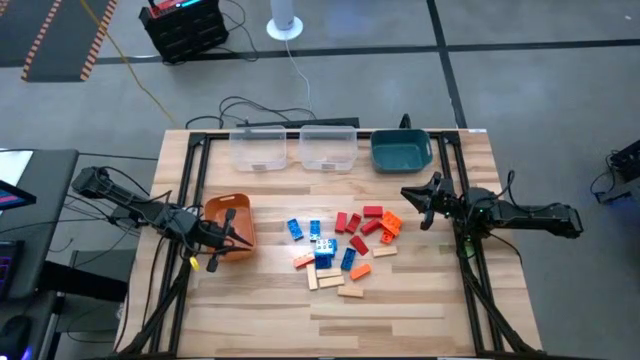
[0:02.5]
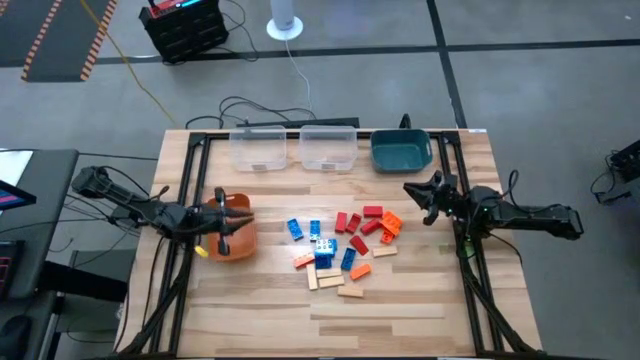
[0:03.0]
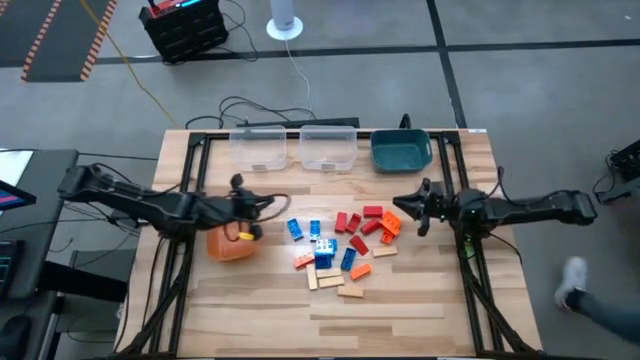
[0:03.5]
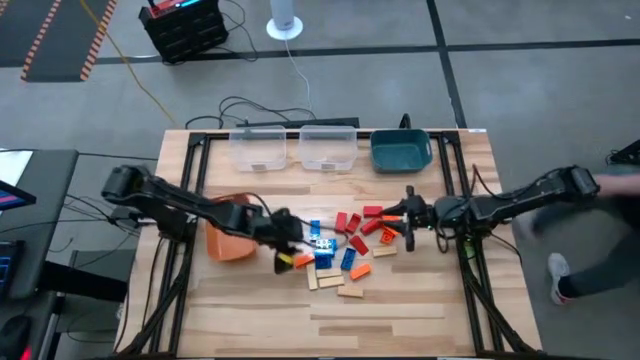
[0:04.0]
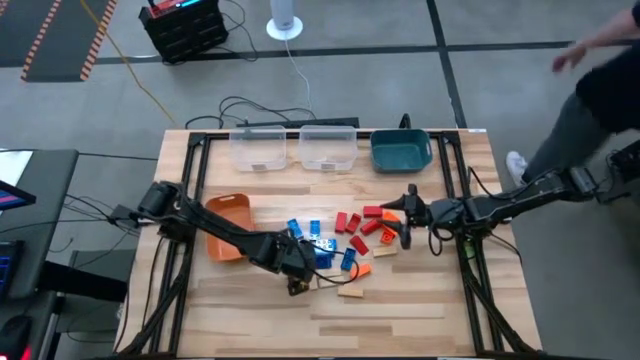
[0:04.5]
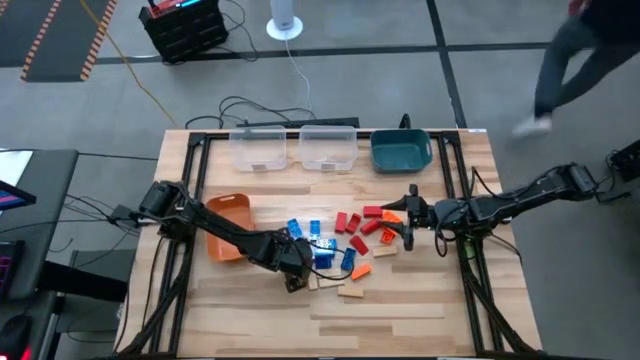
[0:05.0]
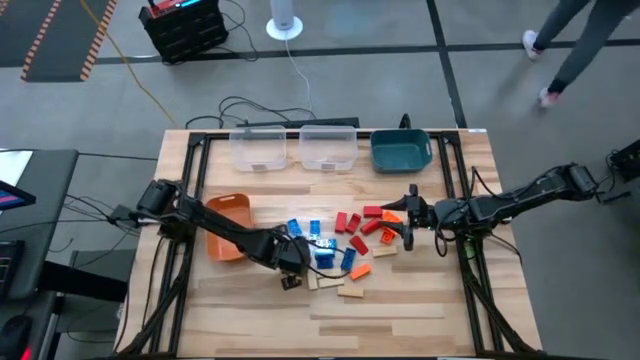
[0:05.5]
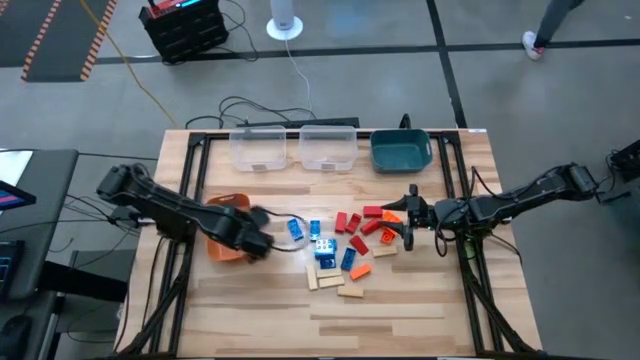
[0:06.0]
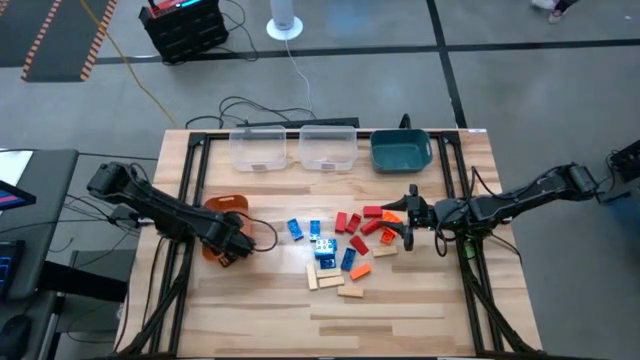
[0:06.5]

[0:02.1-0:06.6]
Task: Sort blocks
Put the orange game piece into the orange bin

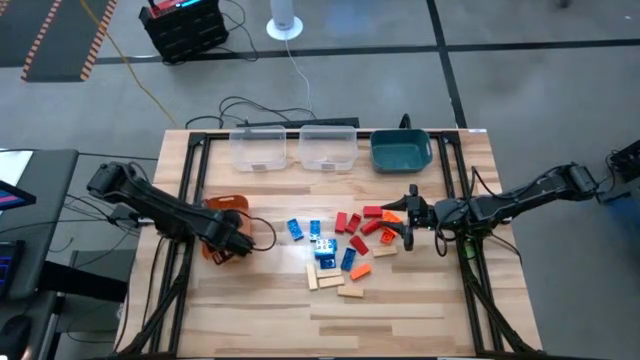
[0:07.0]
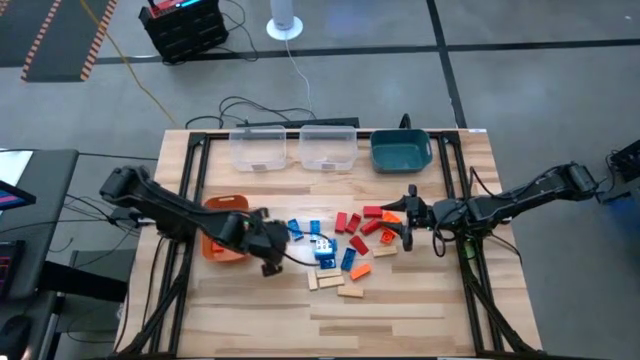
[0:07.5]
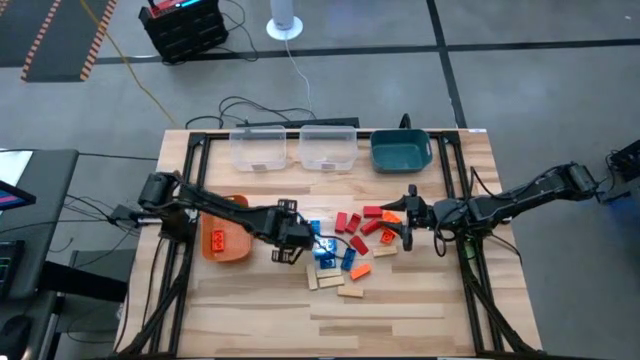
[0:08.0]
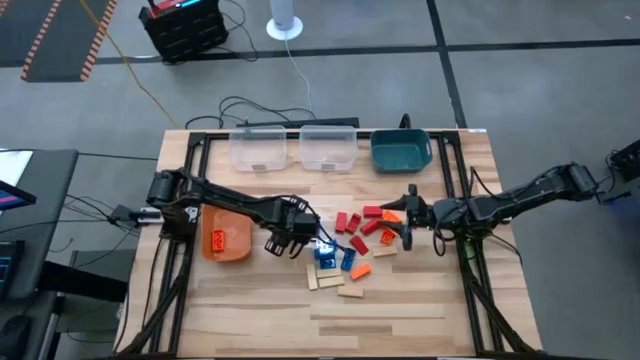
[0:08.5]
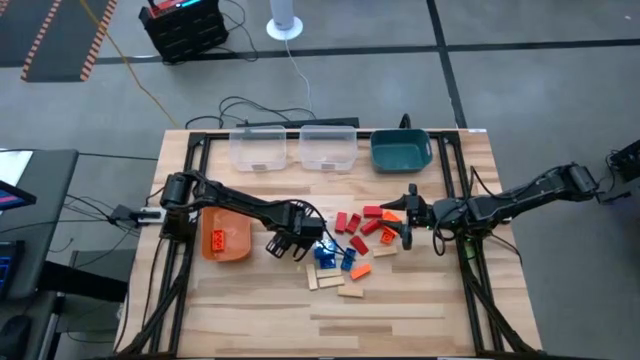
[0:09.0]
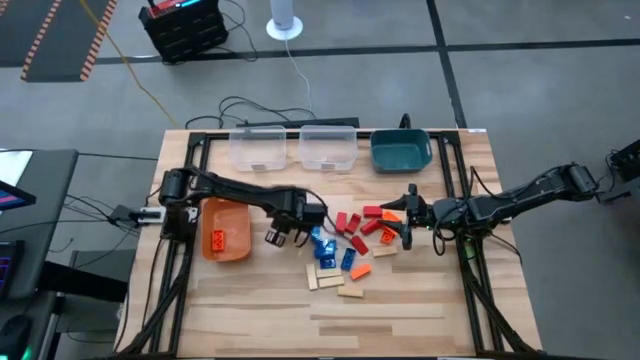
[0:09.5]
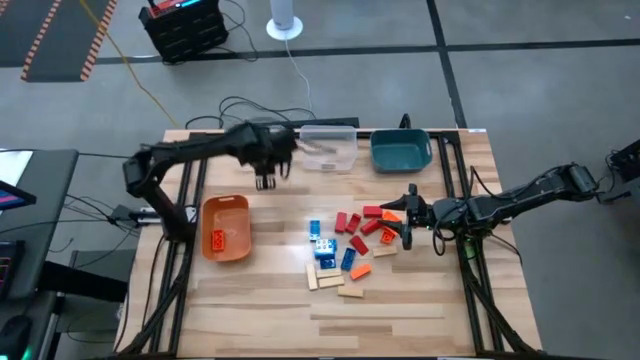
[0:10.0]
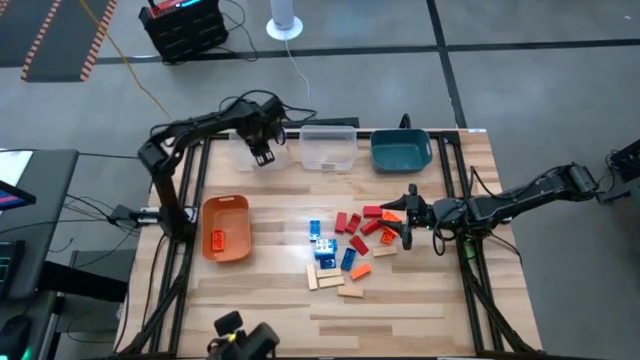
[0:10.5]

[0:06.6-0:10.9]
Put the blue game piece into the left transparent bin

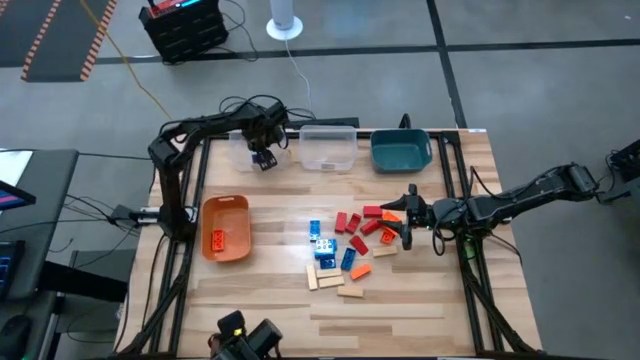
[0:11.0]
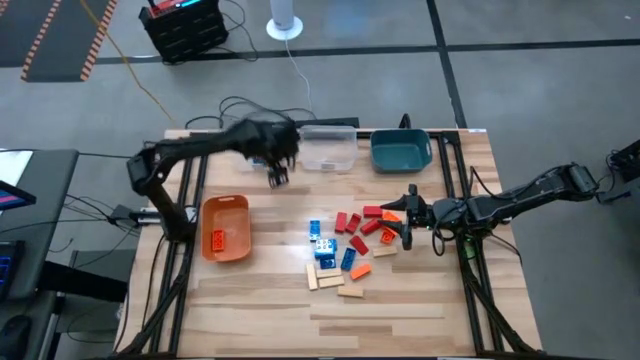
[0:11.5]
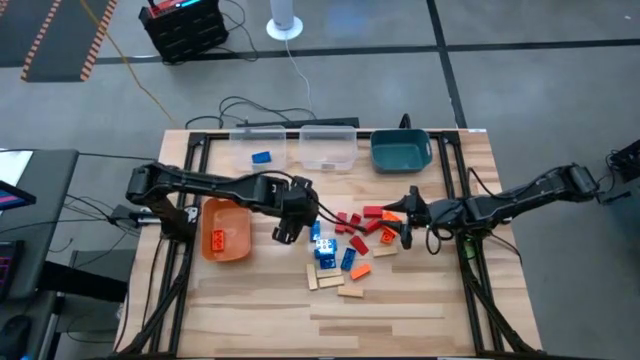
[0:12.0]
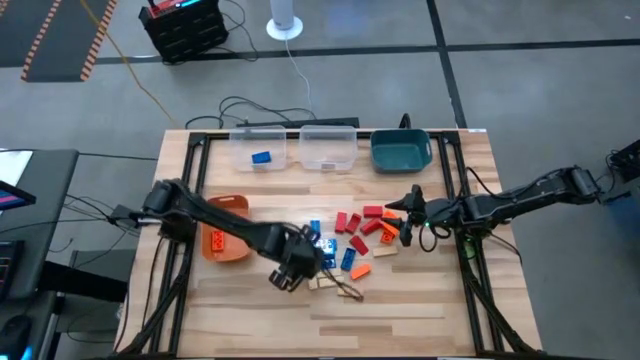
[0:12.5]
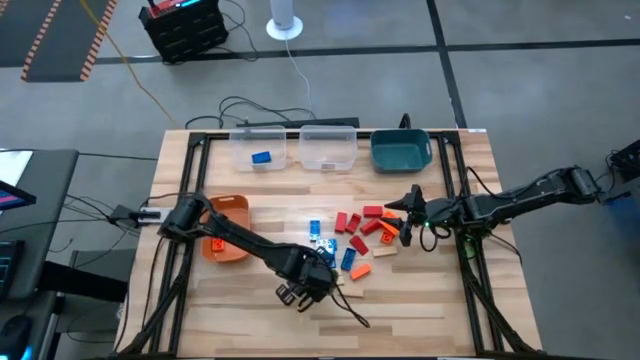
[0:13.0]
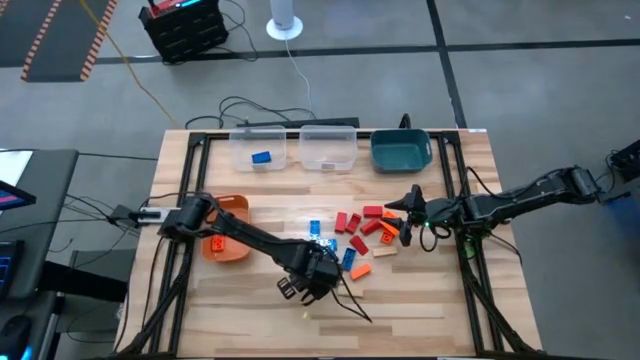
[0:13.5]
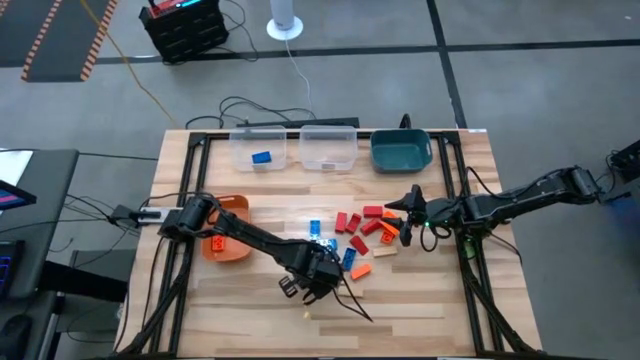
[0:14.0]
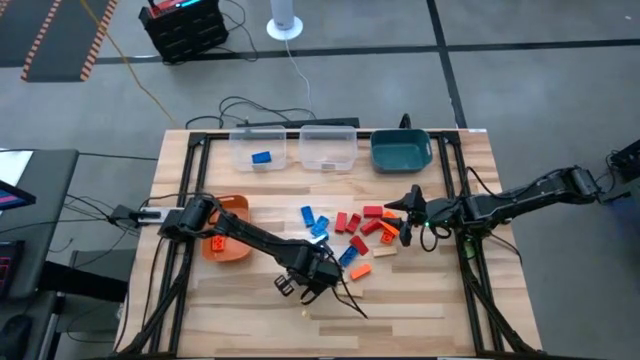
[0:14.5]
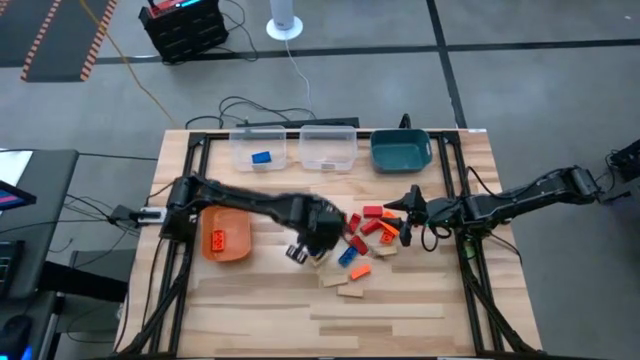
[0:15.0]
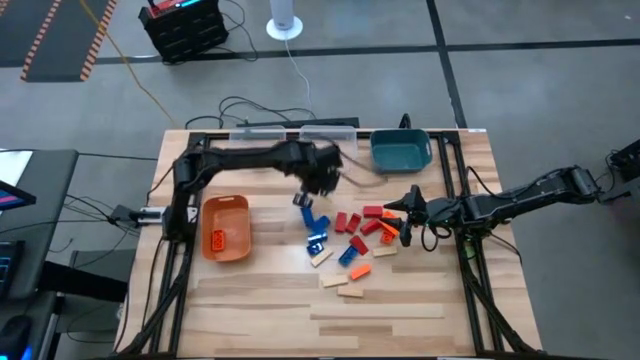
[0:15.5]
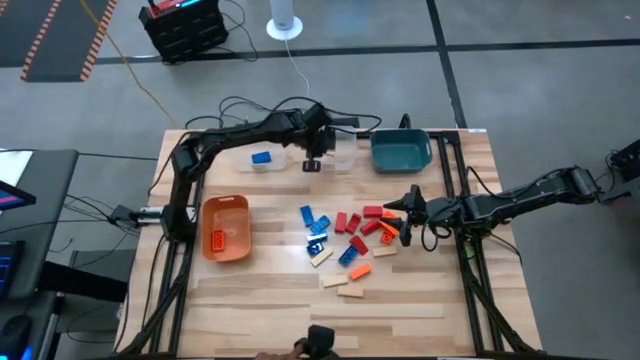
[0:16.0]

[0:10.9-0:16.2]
Put the light brown block into the right transparent bin

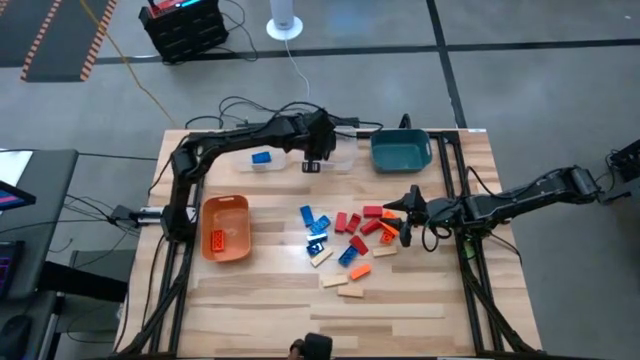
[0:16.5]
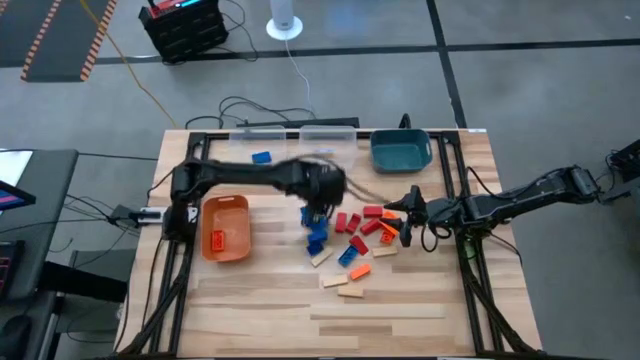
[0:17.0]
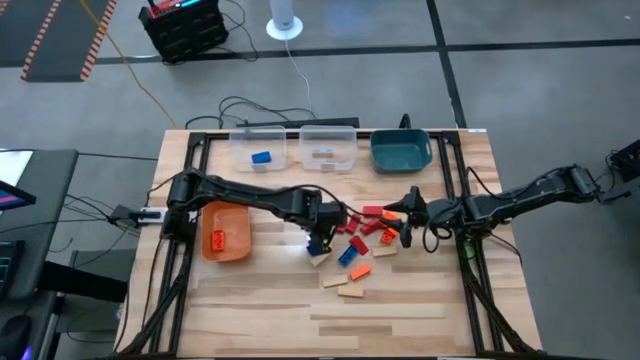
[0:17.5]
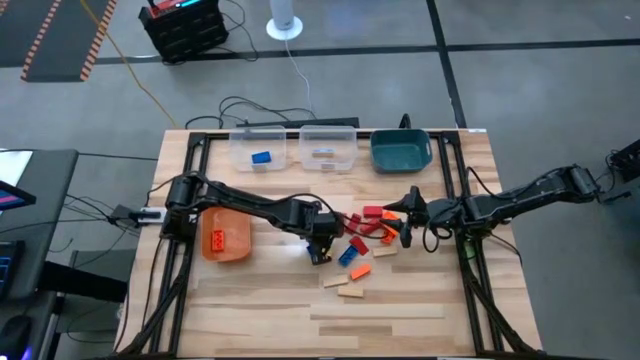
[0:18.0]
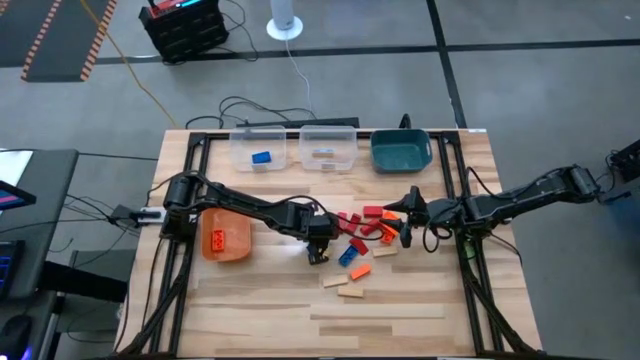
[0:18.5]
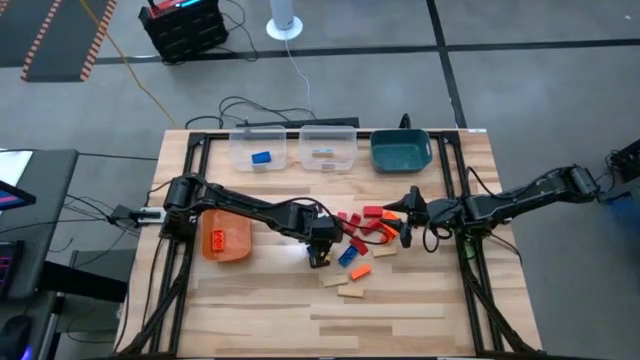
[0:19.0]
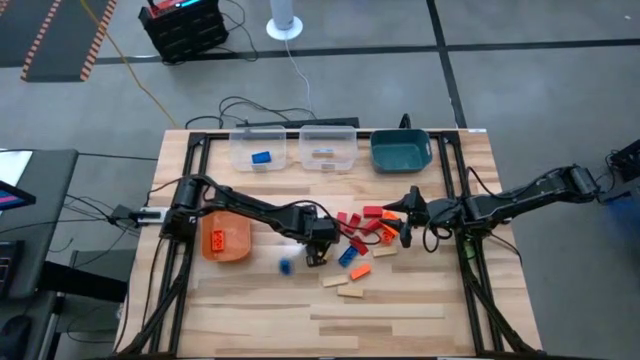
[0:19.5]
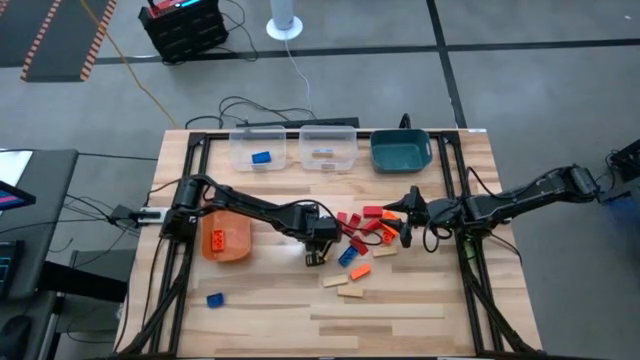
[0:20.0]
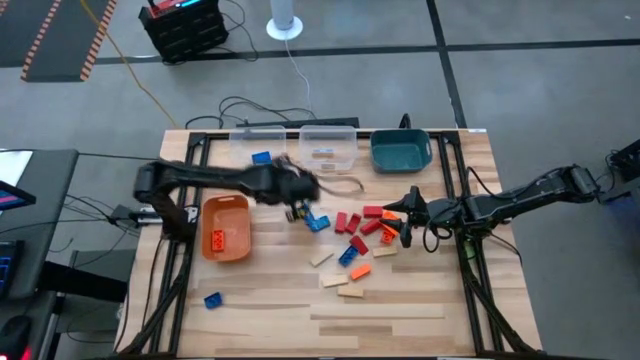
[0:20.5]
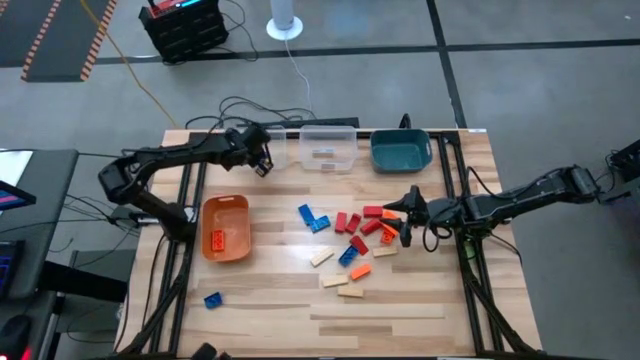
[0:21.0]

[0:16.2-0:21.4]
Put the blue game piece into the left transparent bin

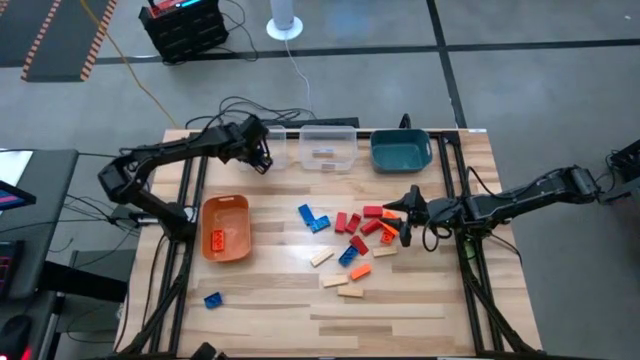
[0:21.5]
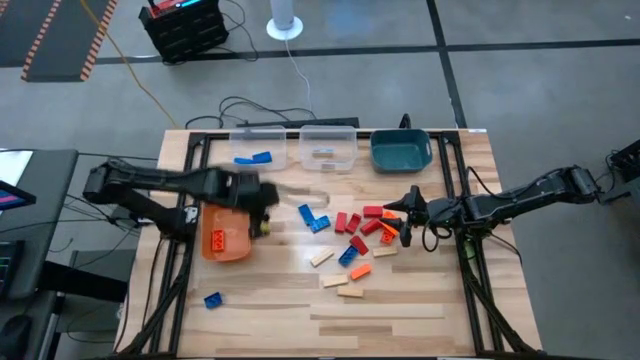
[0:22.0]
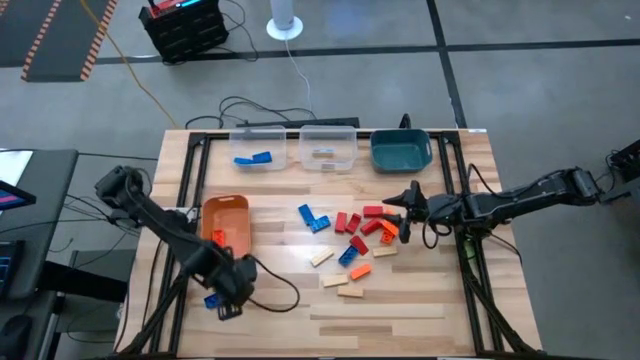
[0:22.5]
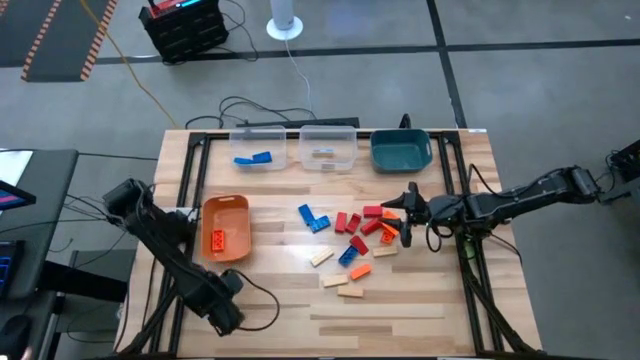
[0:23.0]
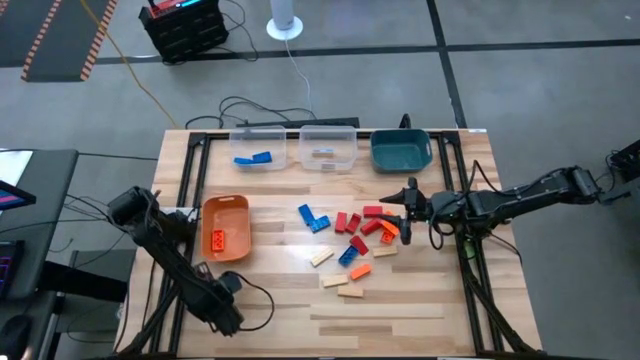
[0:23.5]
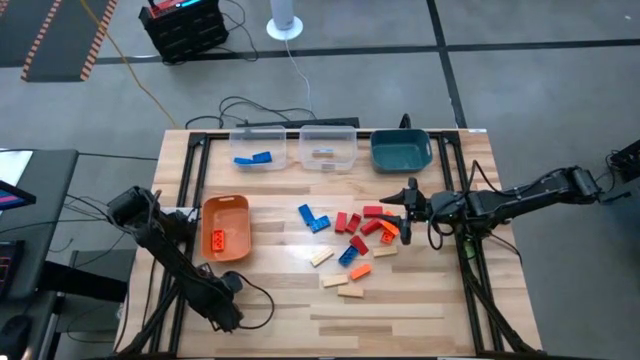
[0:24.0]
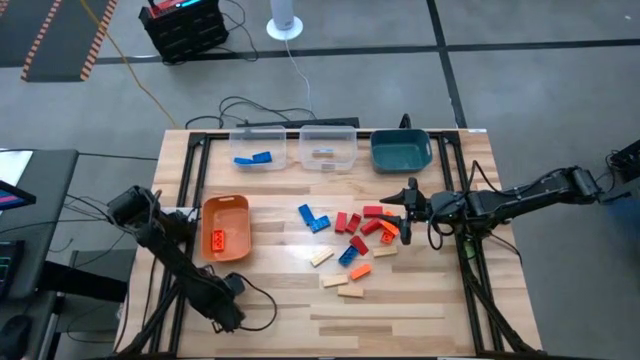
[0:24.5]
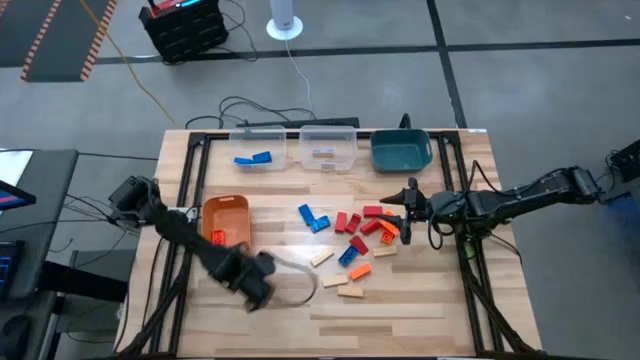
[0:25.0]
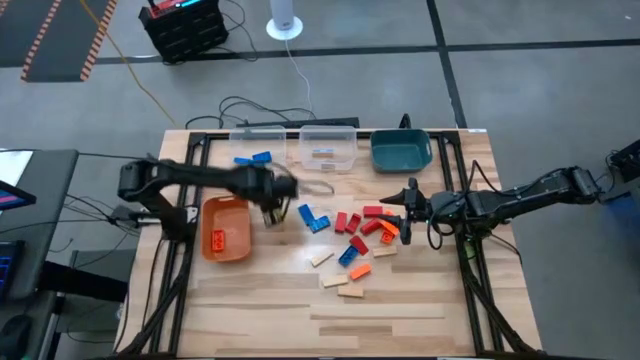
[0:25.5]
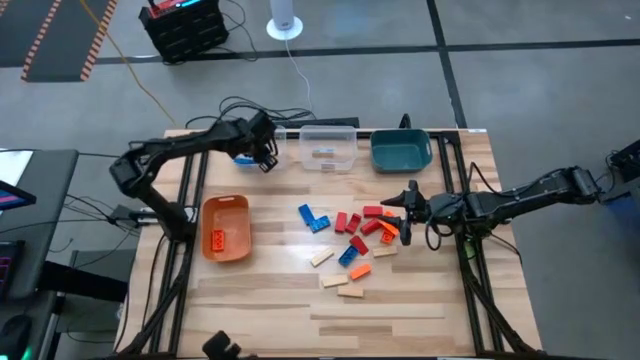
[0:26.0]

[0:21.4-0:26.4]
Put the blue game piece into the left transparent bin
